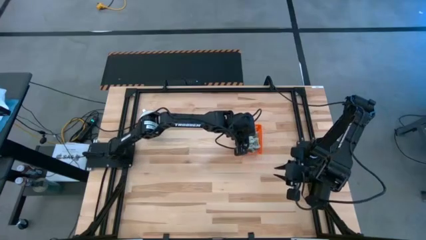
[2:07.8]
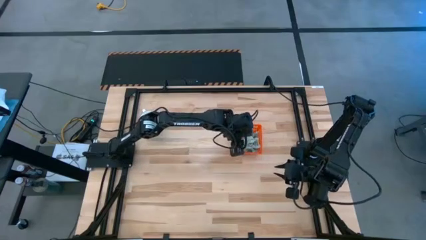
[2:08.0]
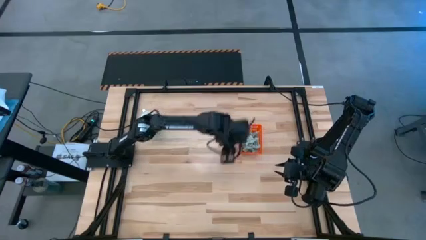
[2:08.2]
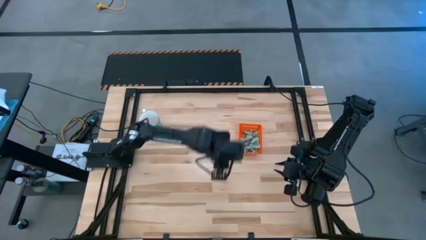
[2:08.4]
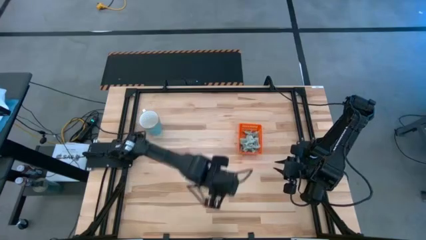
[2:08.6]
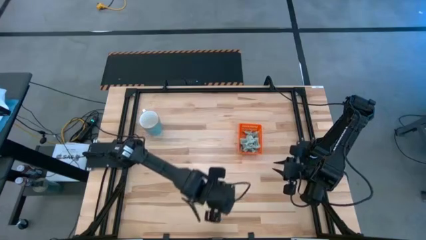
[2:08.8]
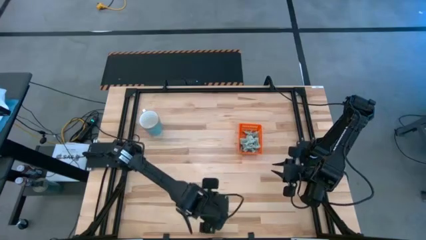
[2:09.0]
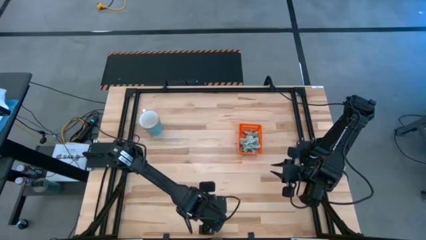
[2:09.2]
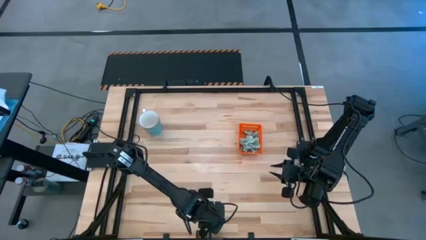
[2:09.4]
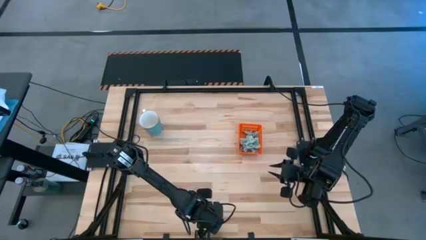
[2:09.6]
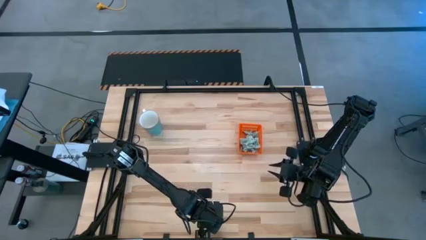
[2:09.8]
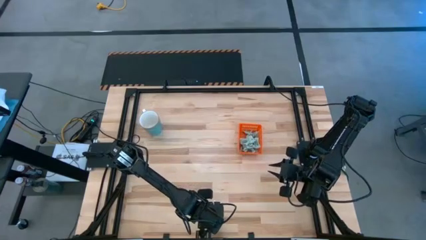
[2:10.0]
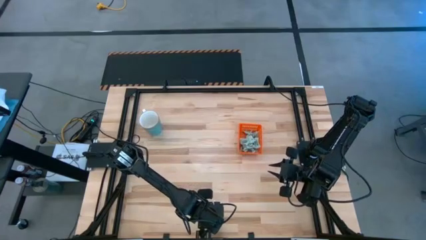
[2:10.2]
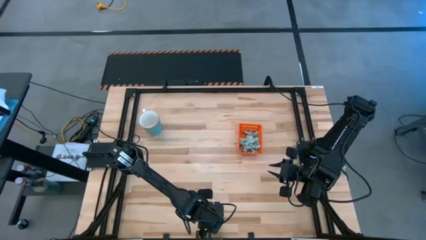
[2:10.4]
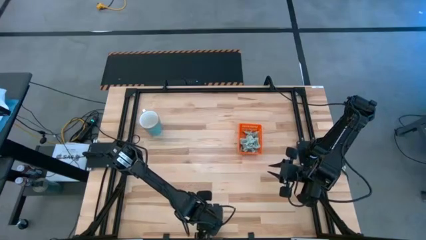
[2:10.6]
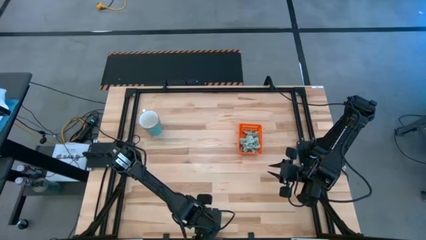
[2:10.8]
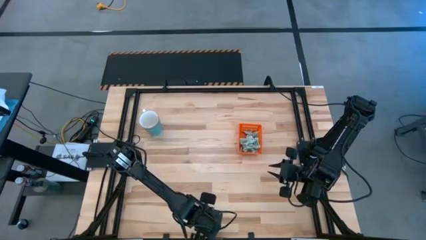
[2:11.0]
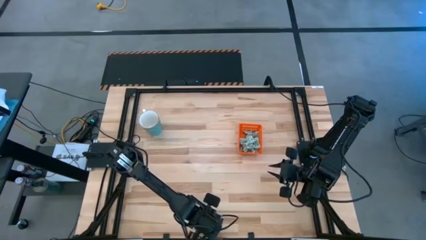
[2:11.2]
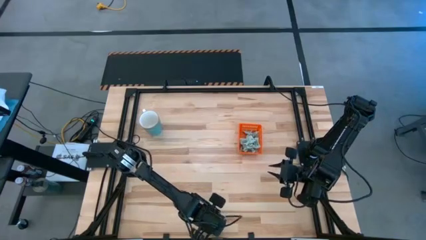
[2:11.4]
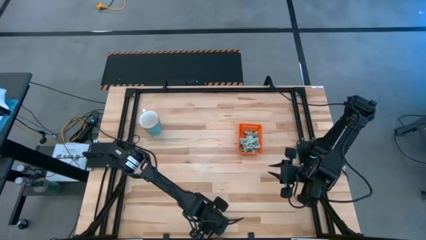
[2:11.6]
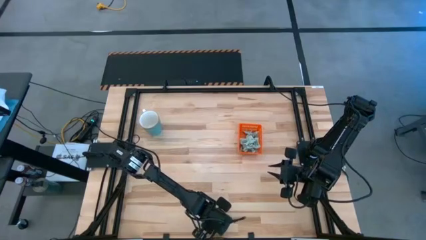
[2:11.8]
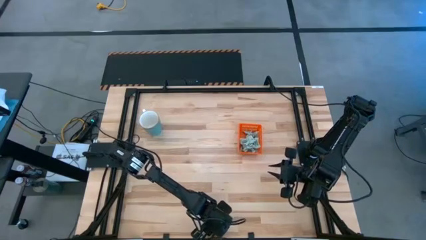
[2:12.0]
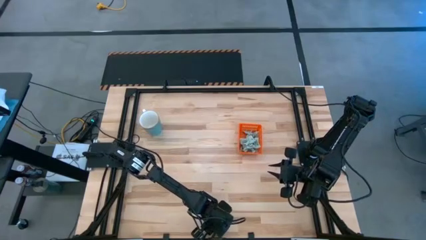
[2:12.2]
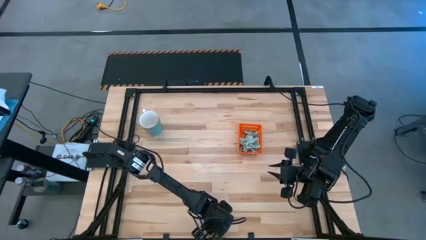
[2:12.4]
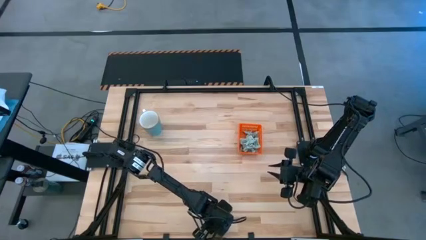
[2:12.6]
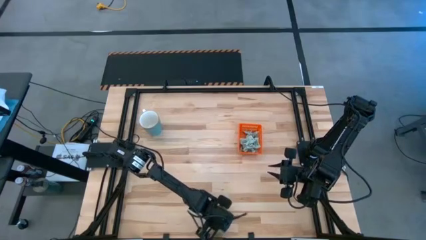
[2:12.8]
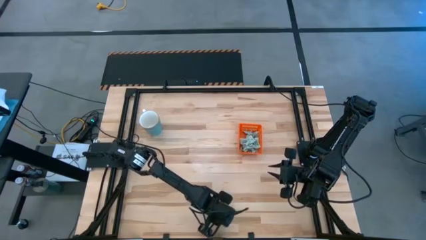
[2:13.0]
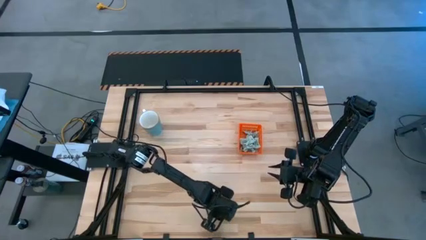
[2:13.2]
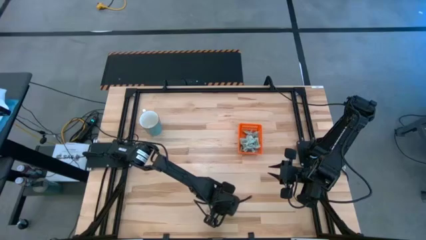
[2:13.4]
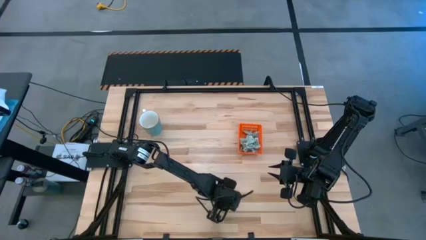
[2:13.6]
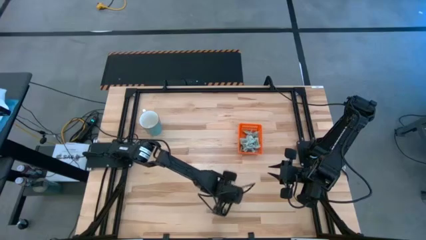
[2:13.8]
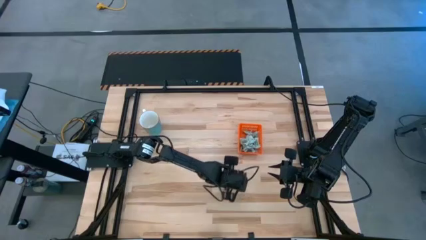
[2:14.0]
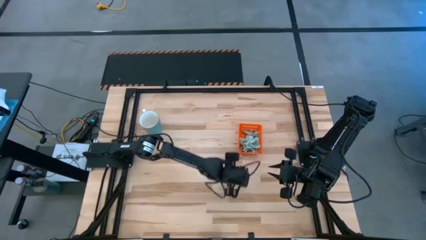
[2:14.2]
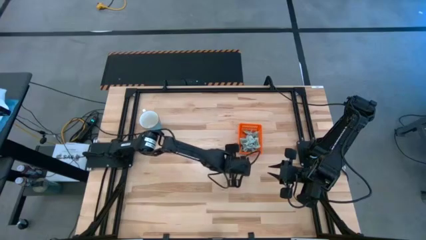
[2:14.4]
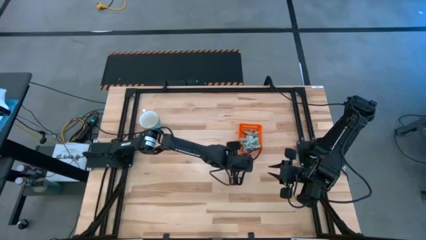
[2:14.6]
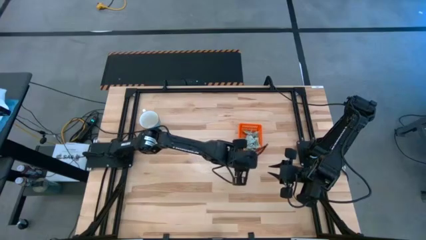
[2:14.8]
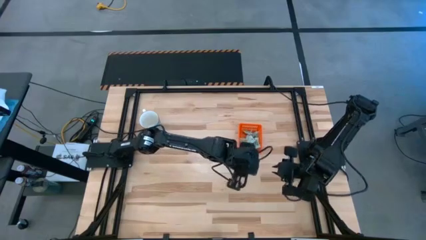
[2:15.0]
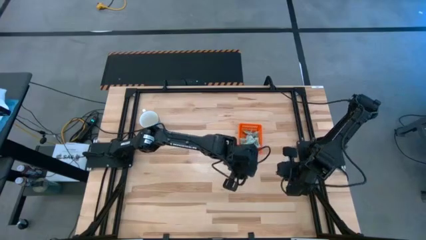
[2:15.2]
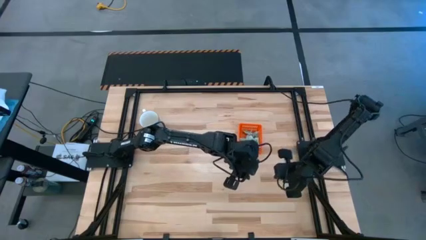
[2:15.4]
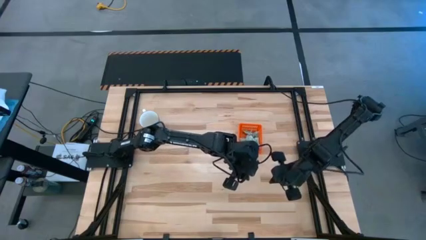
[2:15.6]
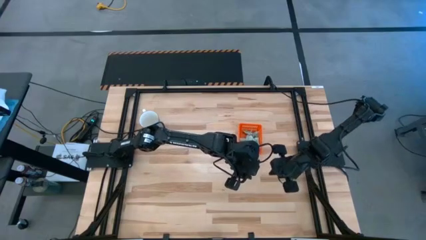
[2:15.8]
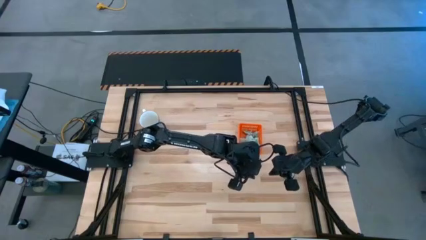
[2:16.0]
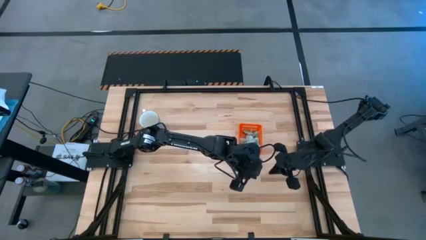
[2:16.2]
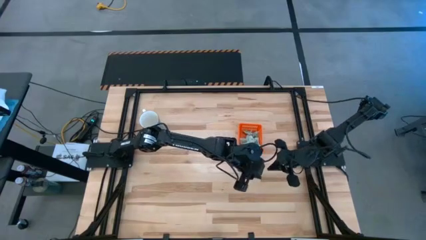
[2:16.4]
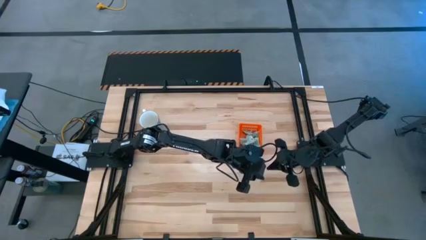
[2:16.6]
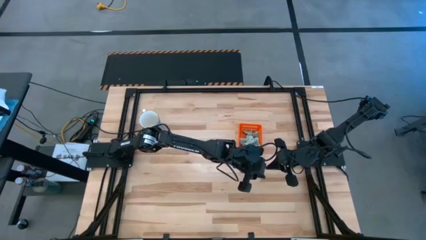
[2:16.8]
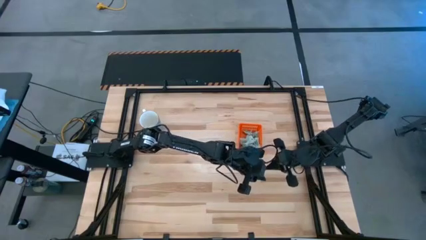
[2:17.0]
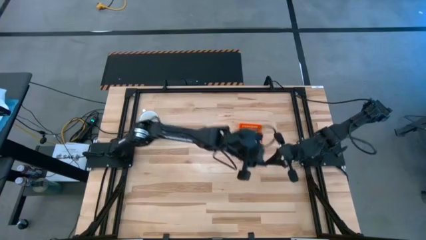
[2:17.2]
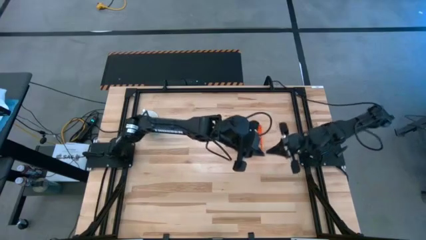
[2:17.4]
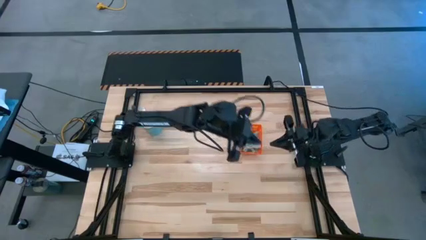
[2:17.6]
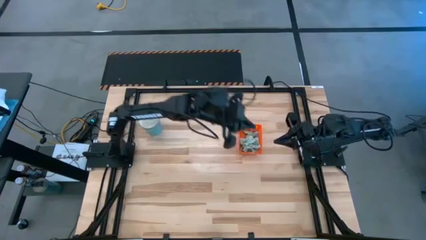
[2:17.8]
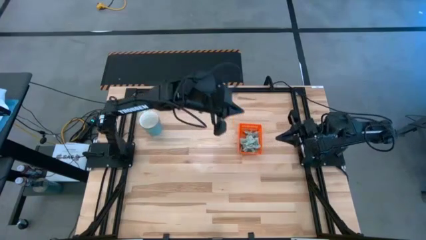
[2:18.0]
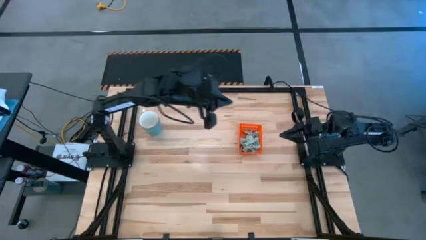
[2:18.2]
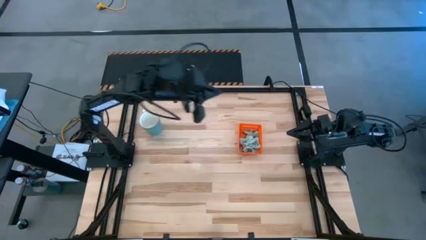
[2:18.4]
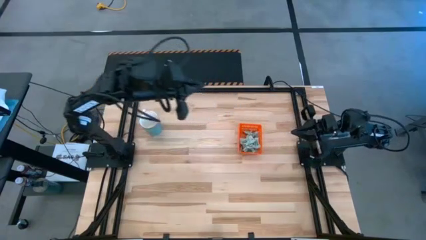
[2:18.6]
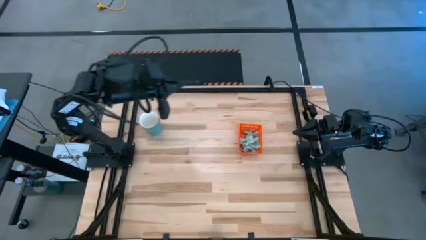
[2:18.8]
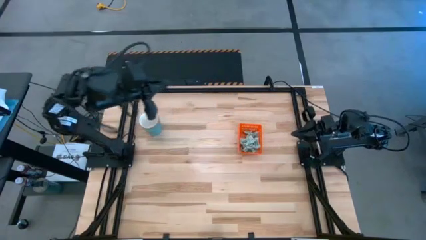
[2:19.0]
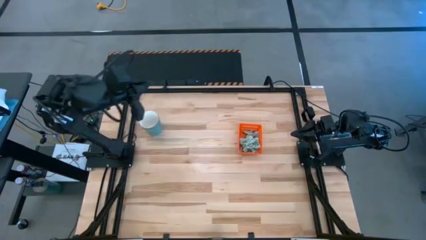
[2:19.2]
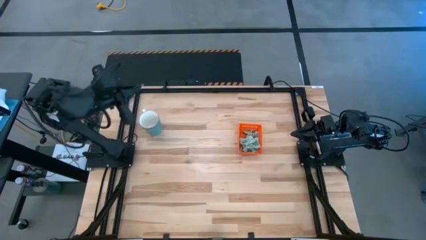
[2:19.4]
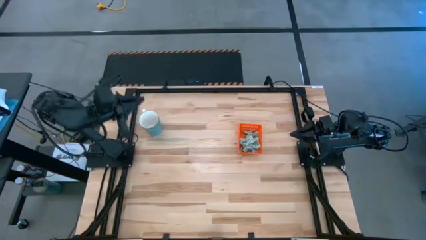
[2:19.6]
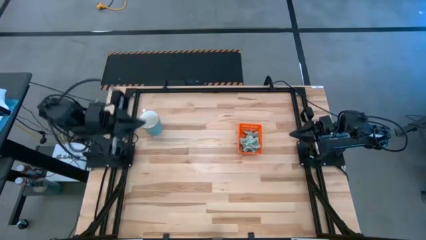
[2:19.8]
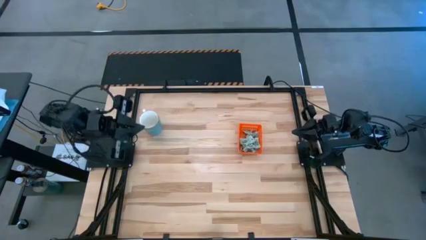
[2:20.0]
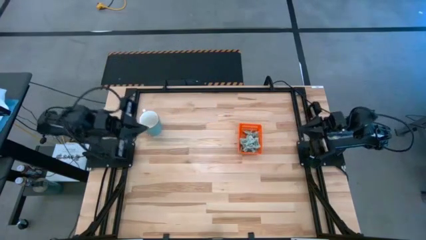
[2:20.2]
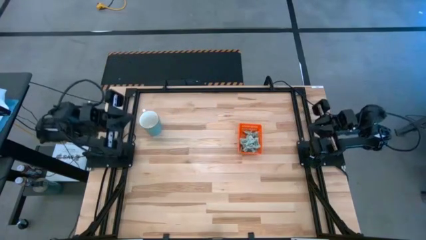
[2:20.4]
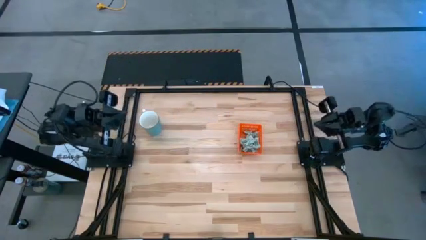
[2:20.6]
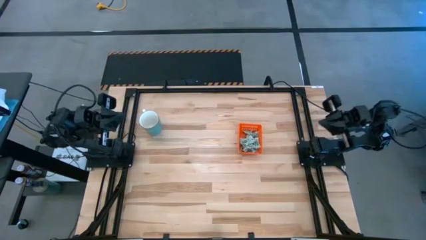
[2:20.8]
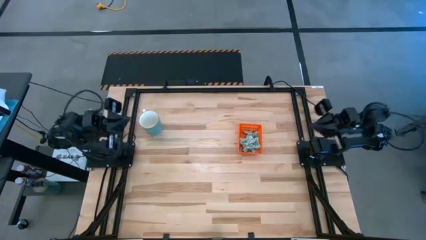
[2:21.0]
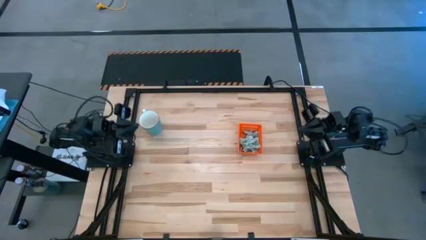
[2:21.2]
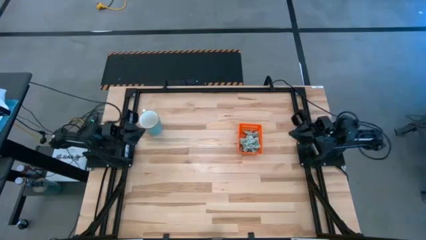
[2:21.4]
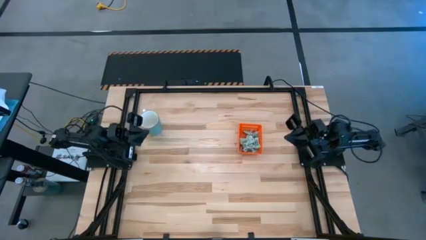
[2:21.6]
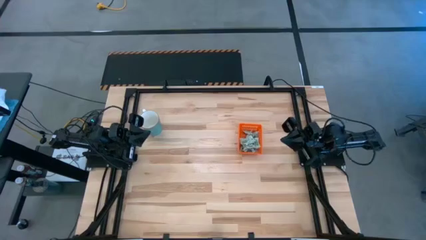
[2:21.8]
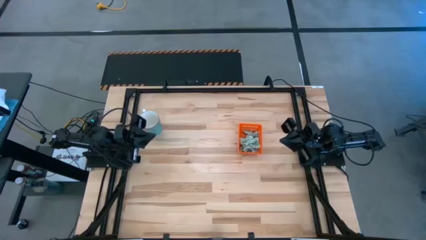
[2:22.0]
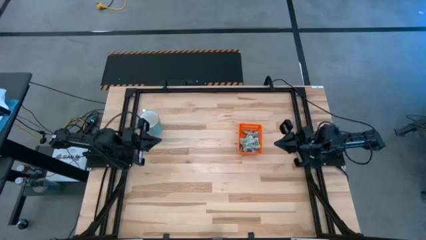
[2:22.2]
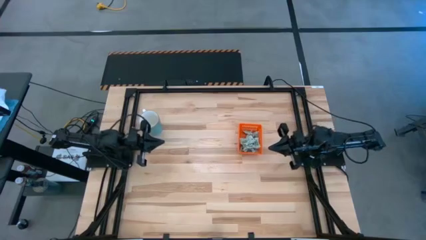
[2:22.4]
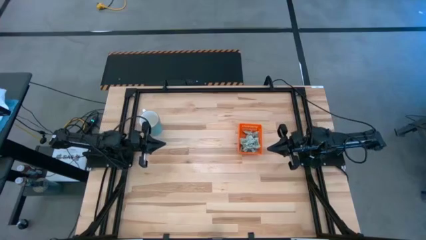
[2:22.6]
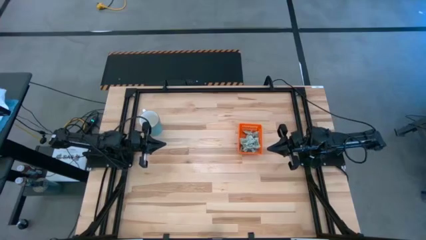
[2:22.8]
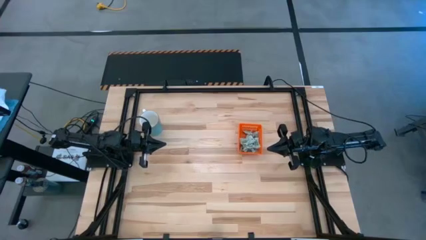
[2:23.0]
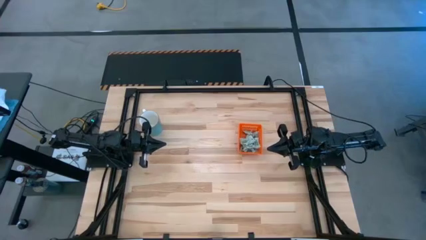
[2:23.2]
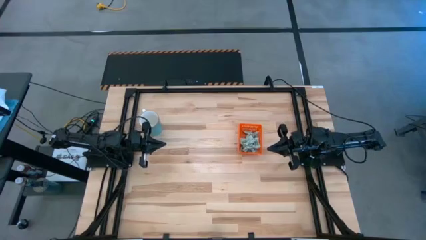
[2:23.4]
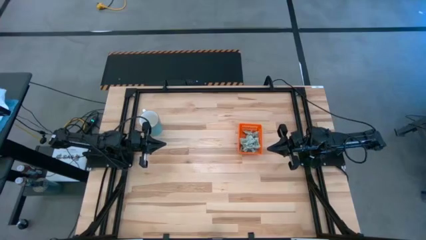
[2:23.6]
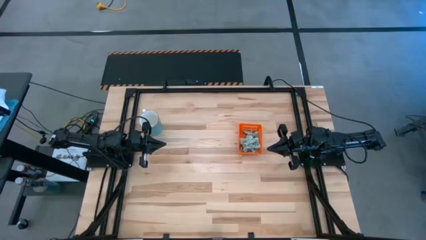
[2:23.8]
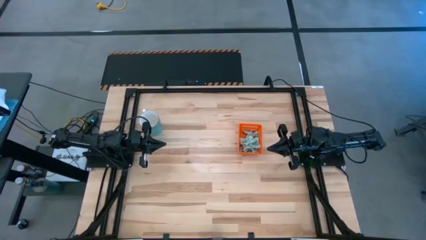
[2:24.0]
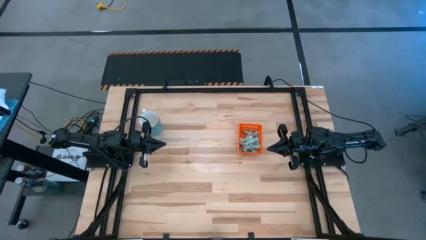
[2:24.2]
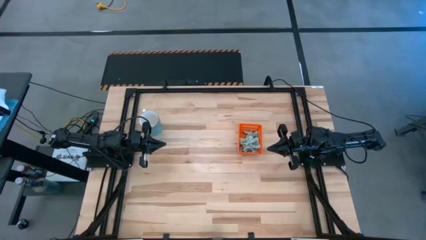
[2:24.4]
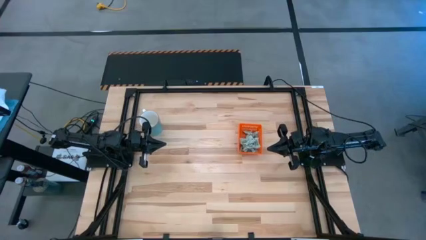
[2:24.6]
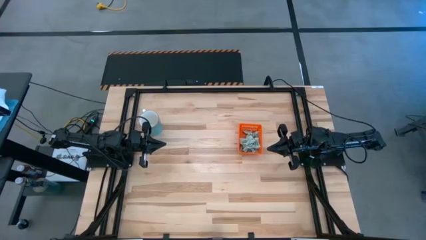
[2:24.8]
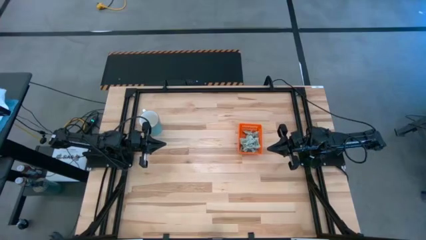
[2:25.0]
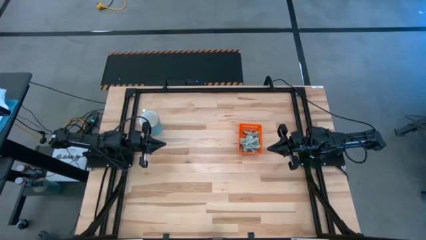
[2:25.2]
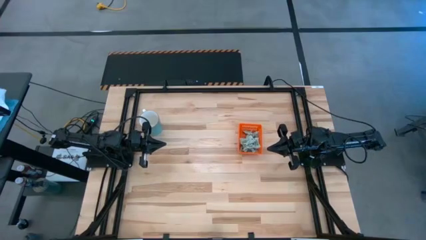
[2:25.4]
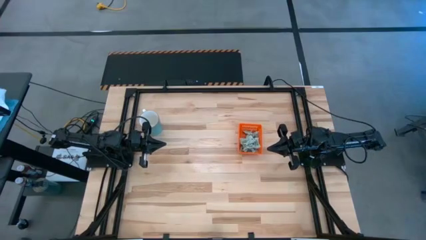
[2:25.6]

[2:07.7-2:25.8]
Task: Pick and place Stevia / Truvia into bins
Return to Home Position
